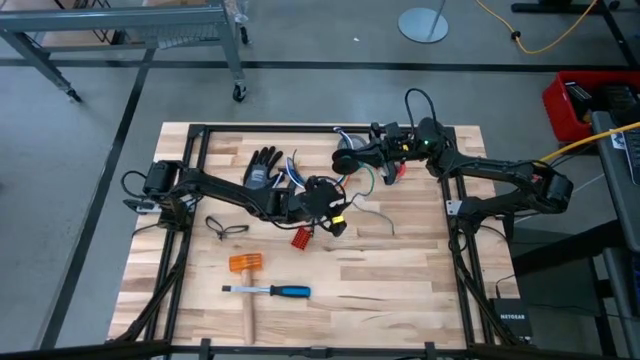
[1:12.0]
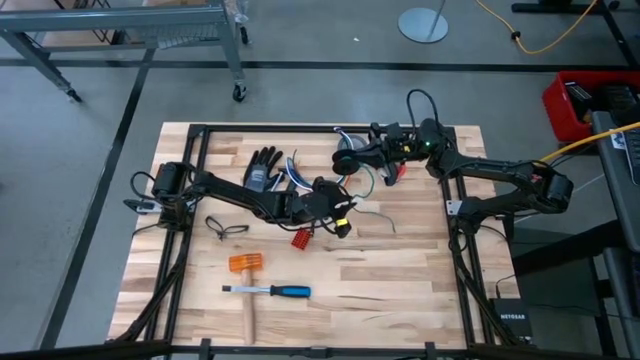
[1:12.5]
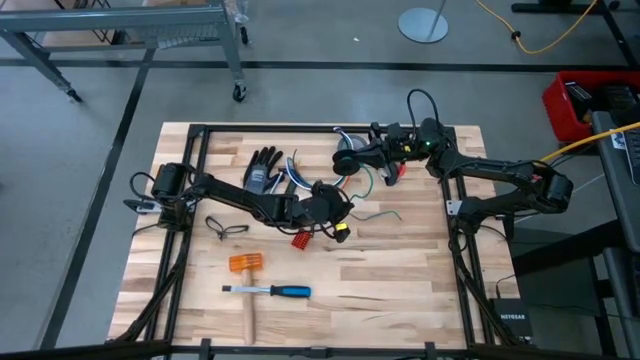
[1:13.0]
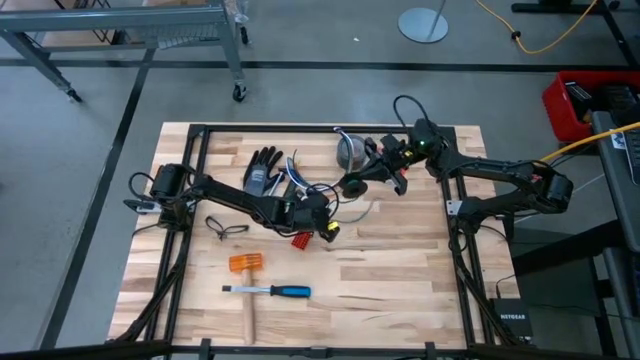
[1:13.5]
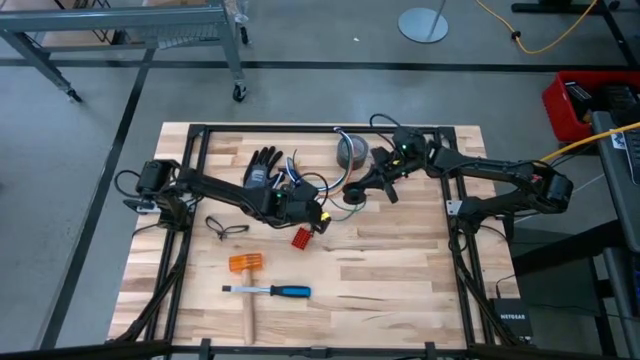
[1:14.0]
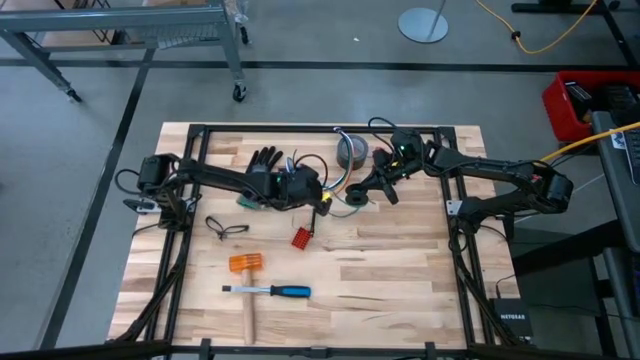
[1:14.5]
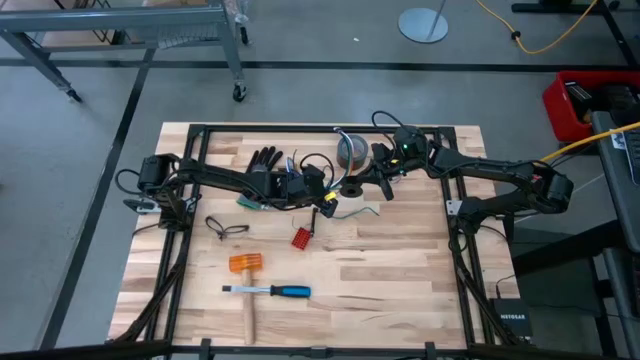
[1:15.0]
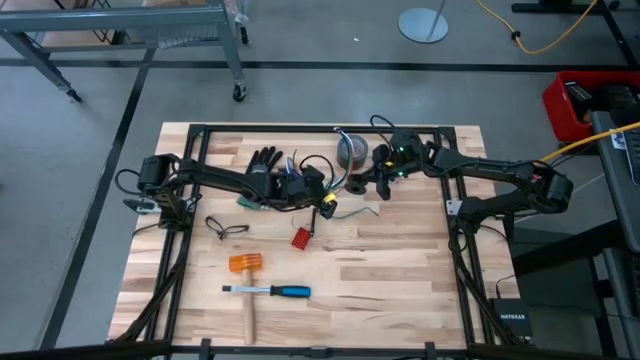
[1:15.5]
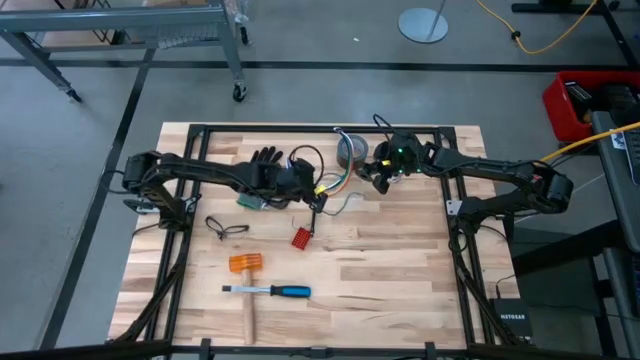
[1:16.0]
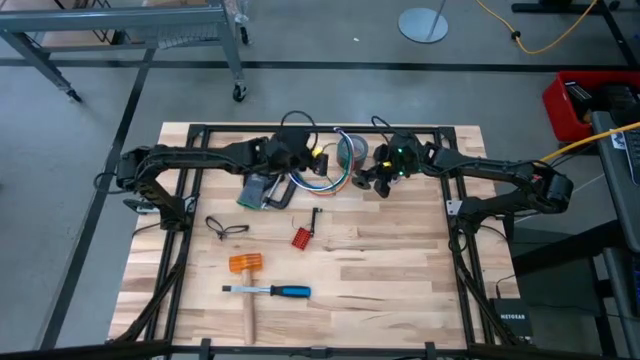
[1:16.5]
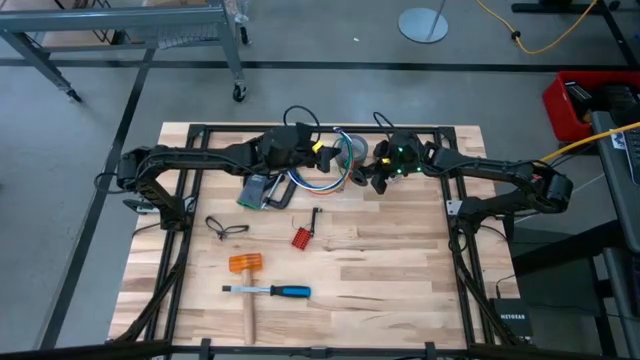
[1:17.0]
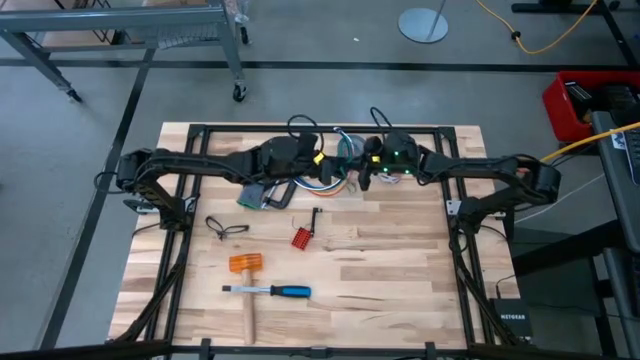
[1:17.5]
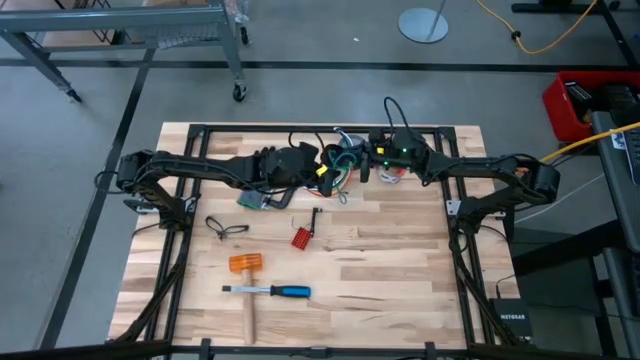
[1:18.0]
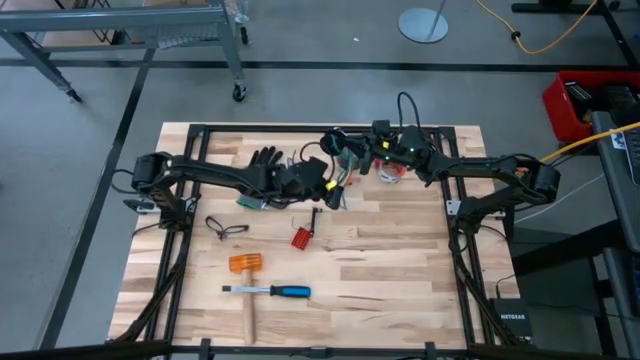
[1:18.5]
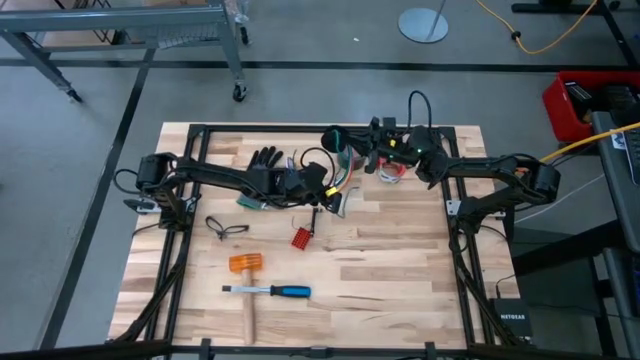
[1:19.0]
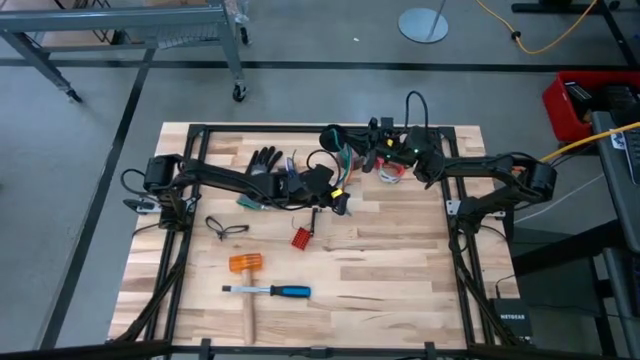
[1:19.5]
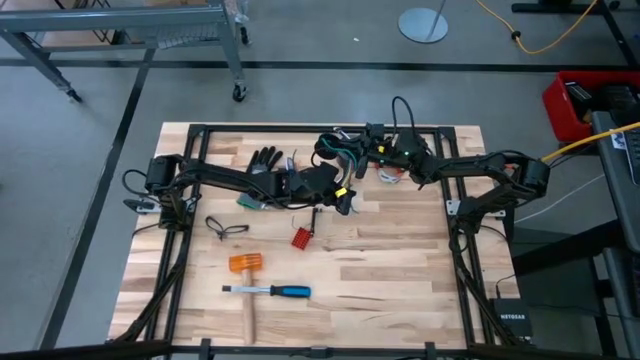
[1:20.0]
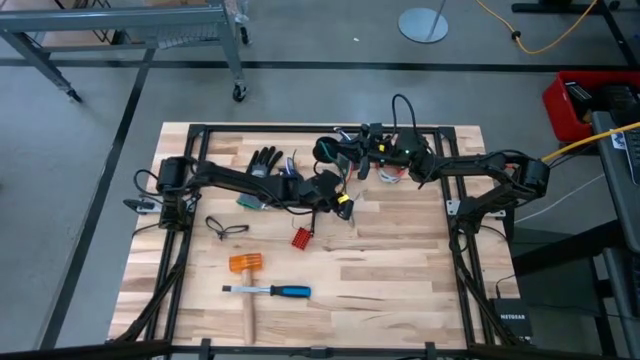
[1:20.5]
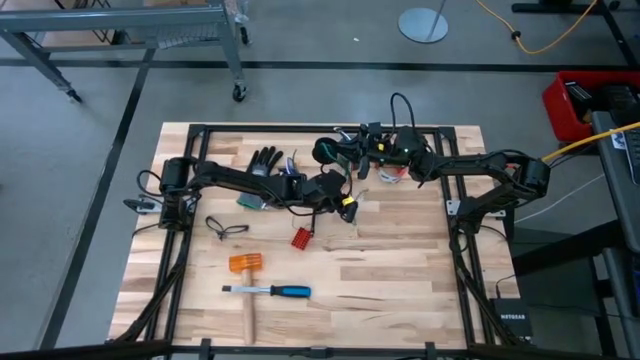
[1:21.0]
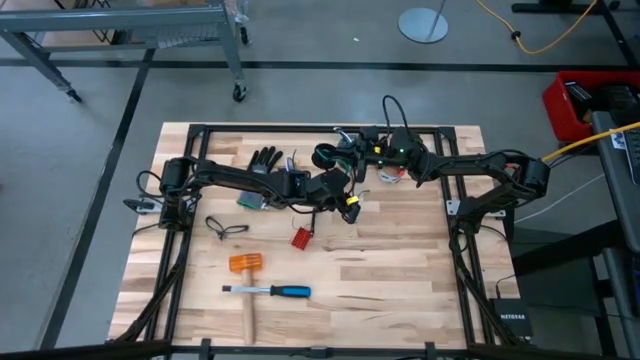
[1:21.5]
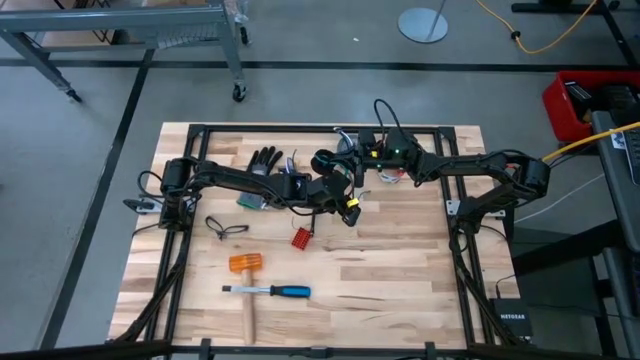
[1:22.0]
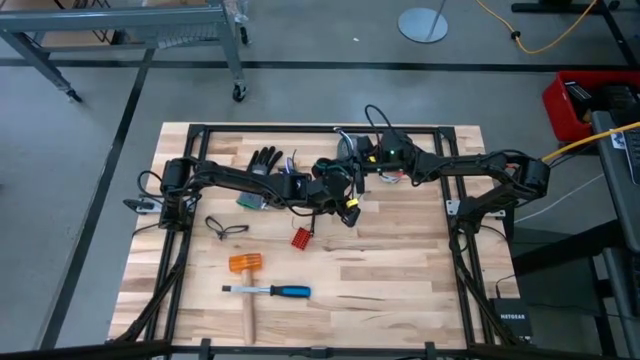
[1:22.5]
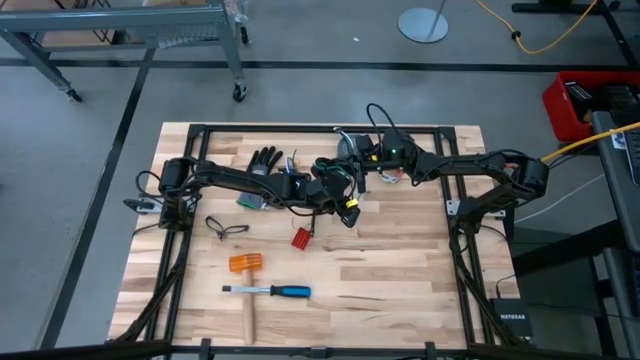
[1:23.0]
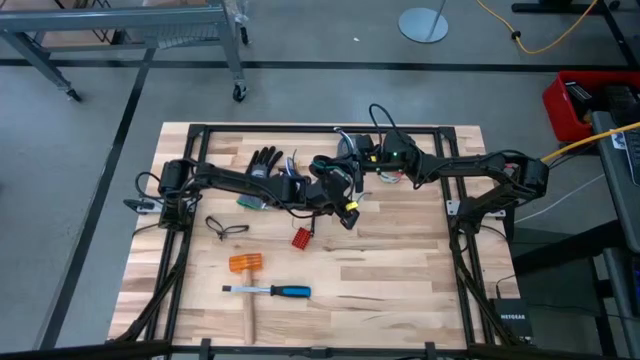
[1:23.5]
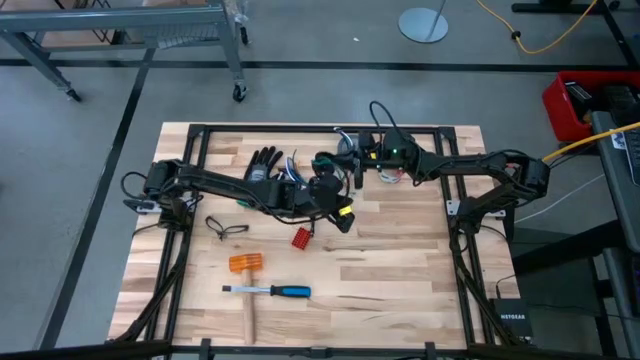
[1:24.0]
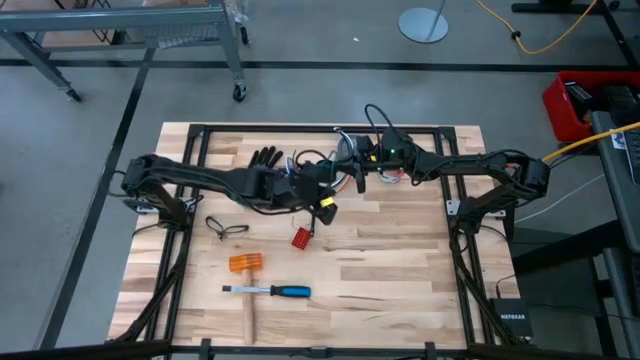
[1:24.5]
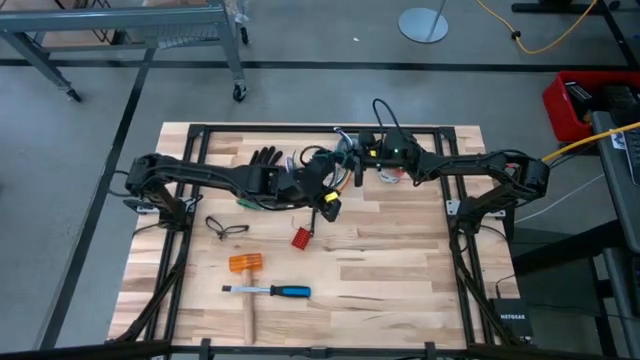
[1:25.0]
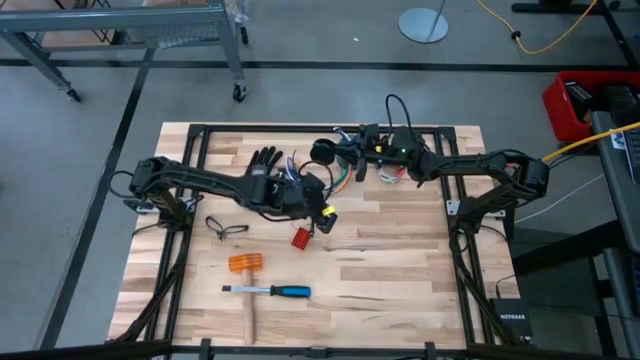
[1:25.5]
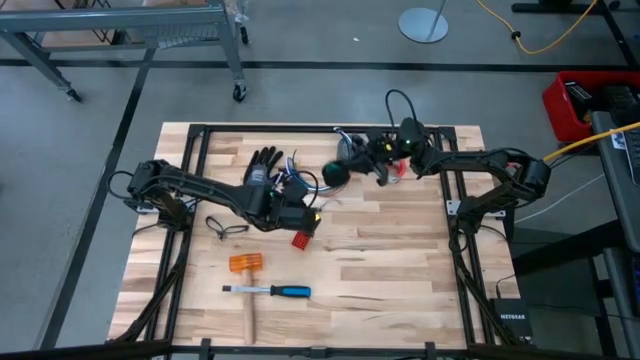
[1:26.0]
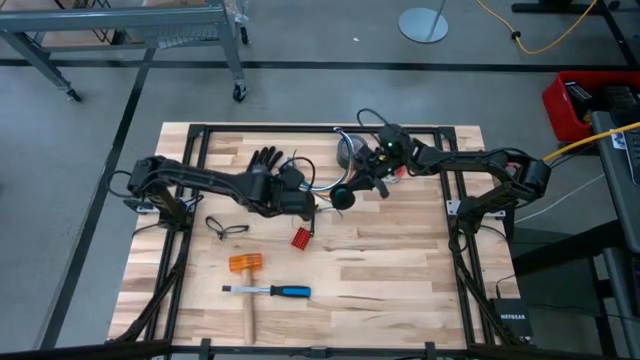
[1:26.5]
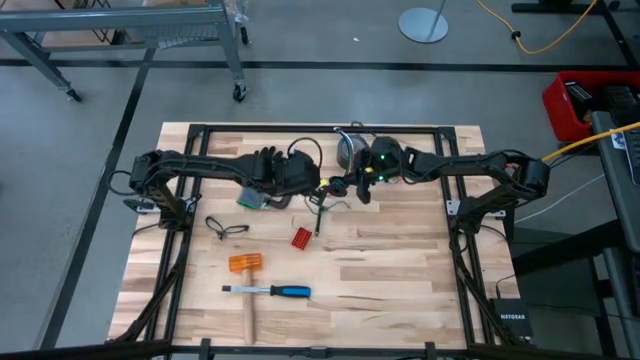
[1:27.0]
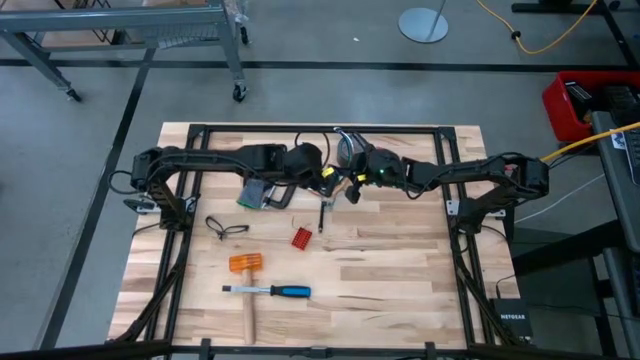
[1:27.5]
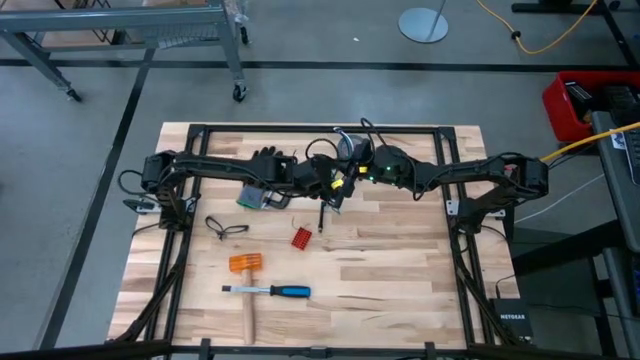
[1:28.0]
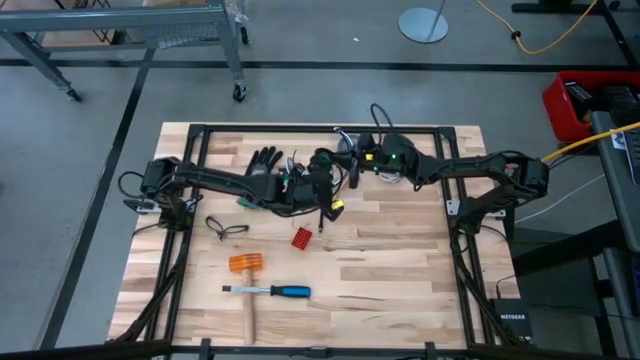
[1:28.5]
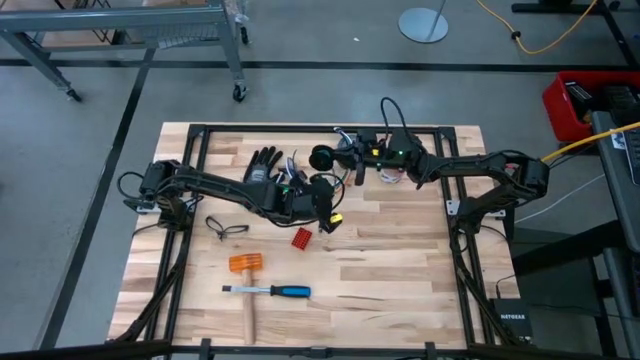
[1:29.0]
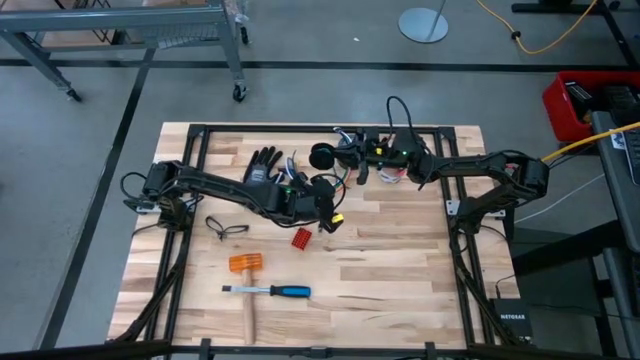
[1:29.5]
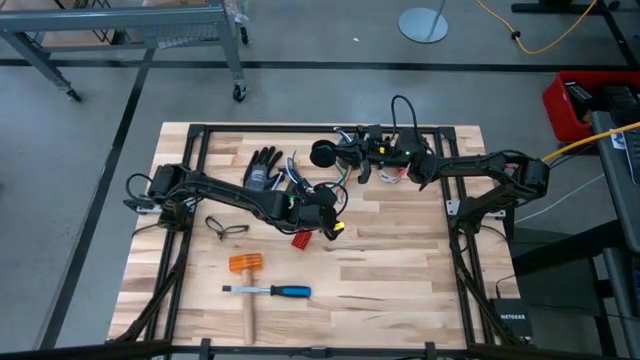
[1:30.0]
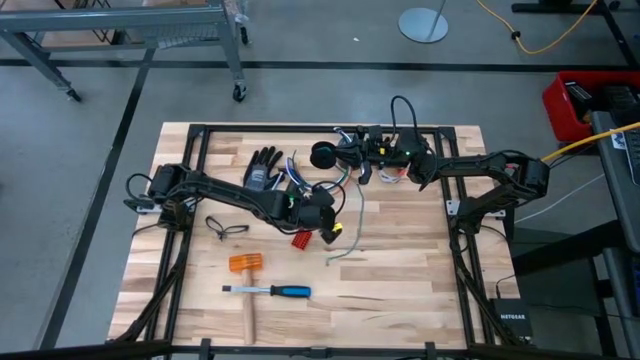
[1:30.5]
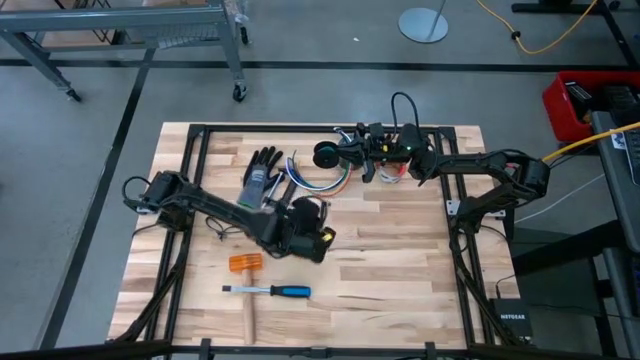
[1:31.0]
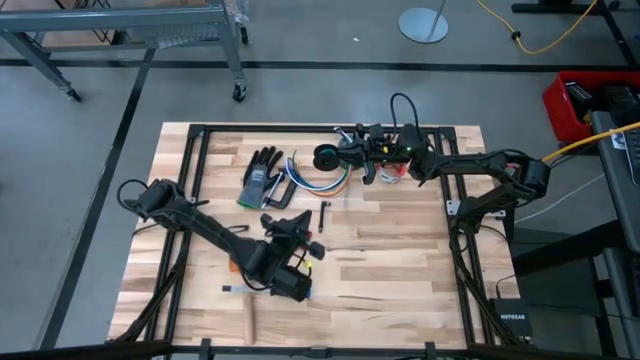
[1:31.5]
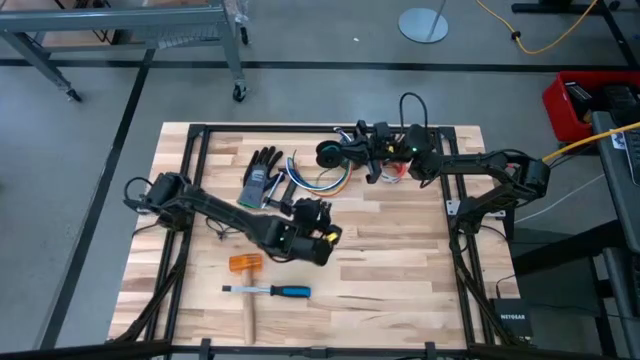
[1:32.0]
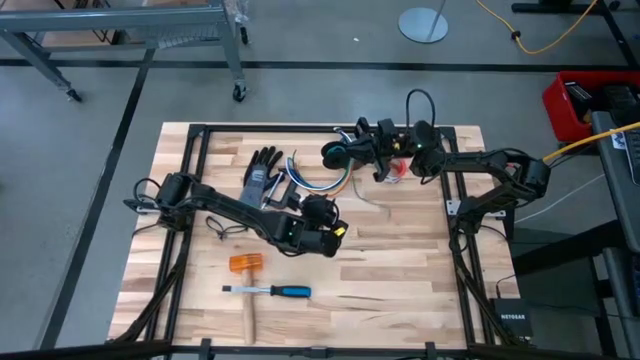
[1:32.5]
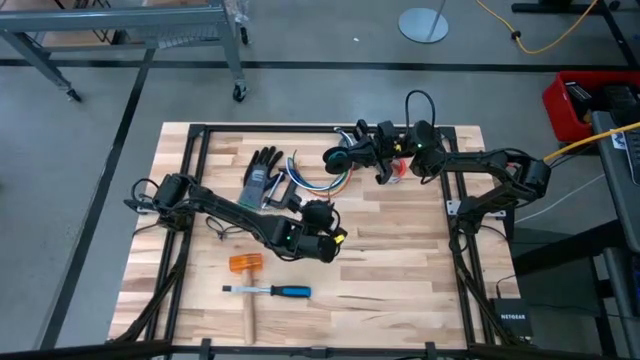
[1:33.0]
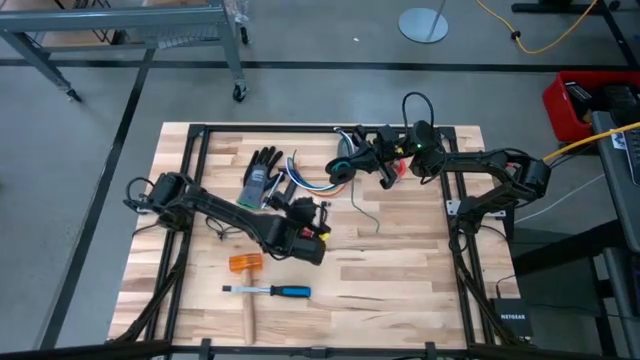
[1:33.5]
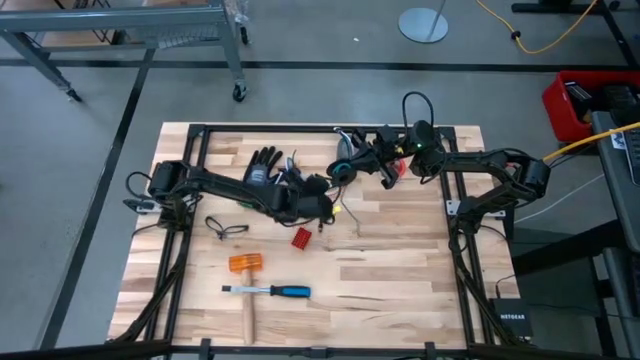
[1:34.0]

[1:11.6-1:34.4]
Task: Coil cords
Coil the green wire into the black spool
